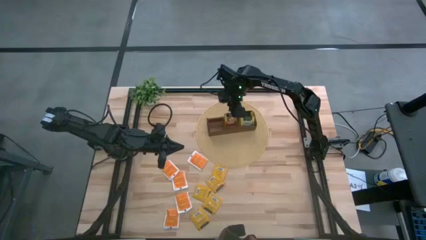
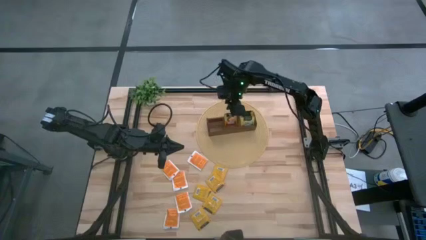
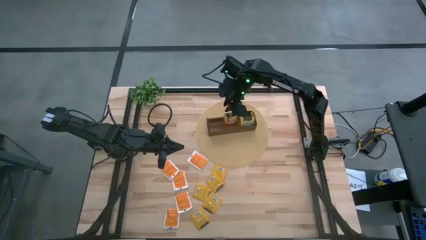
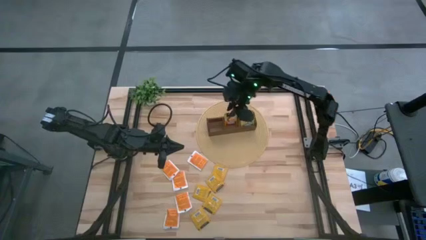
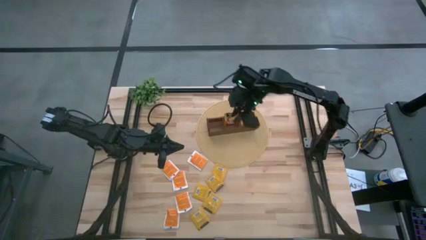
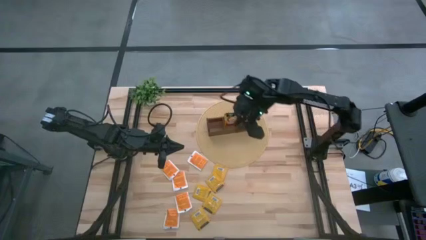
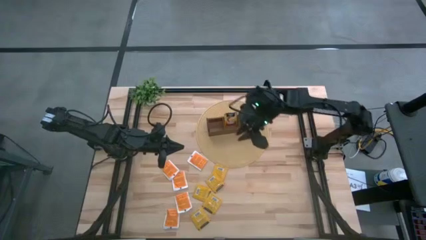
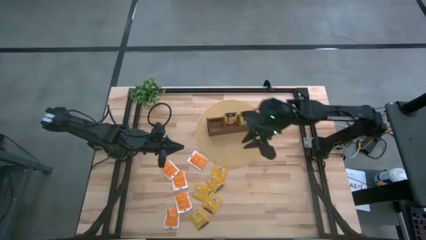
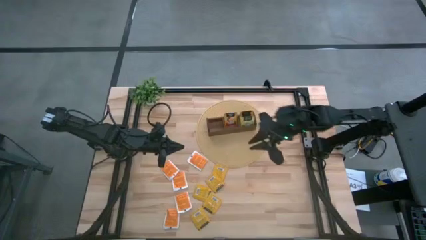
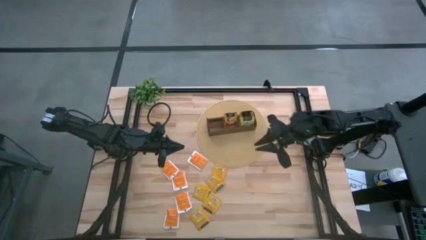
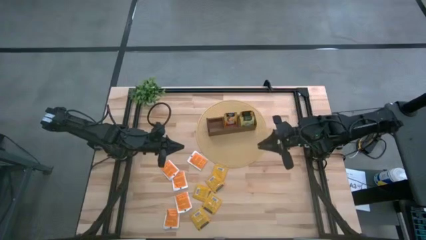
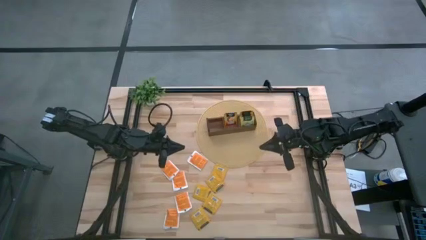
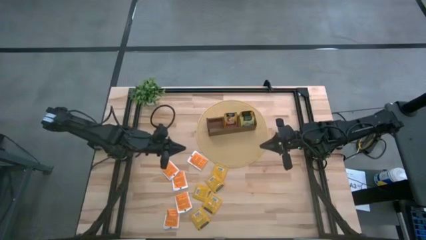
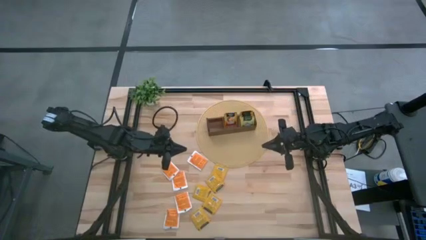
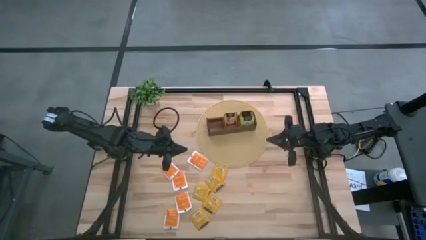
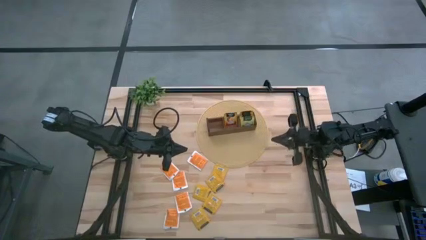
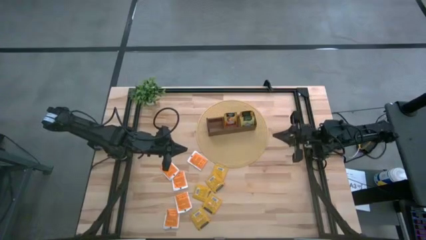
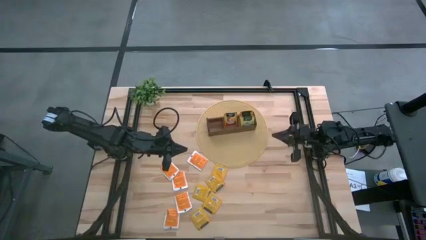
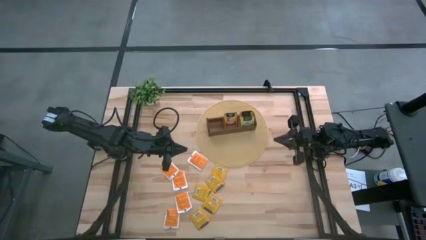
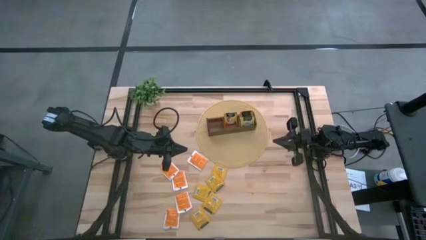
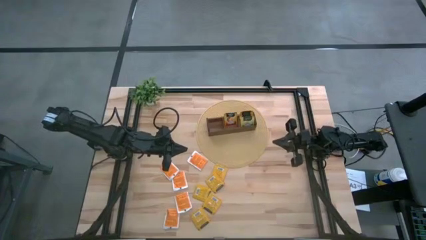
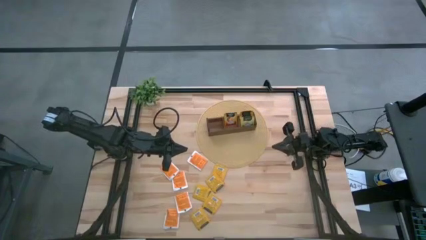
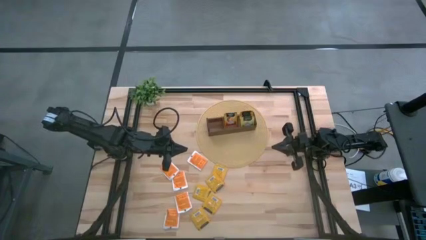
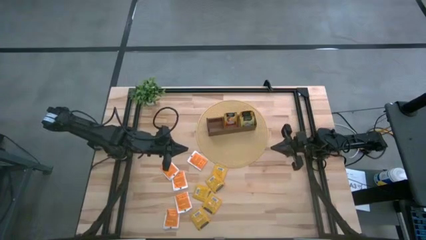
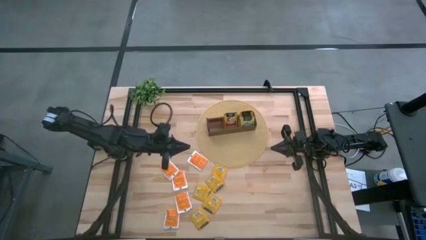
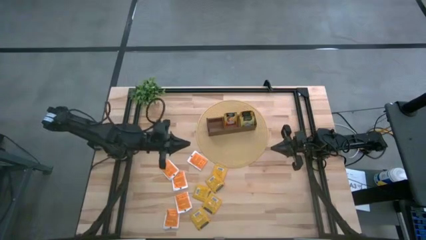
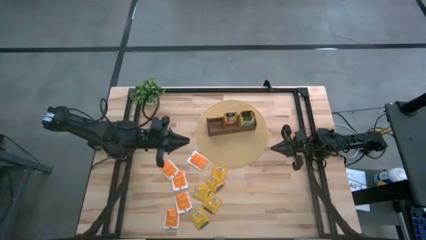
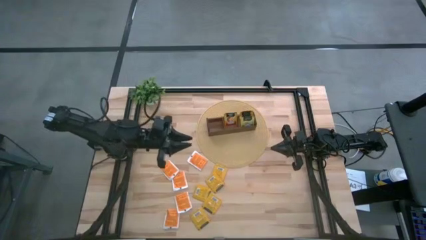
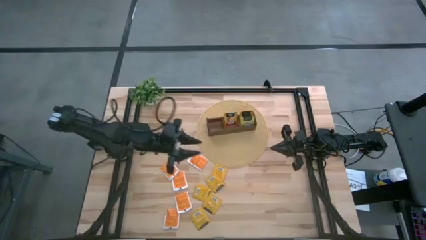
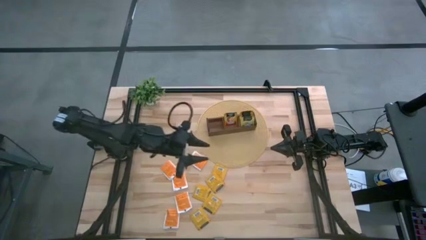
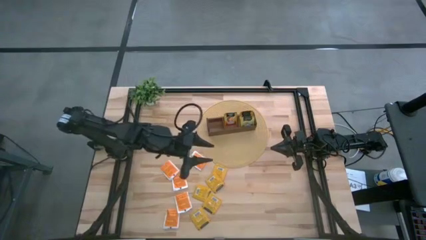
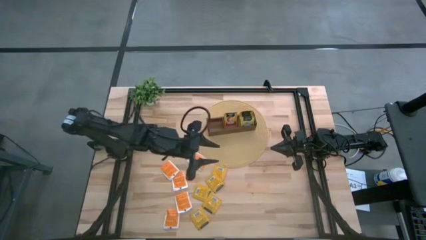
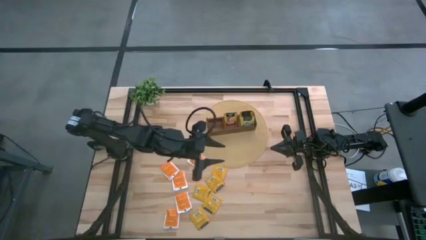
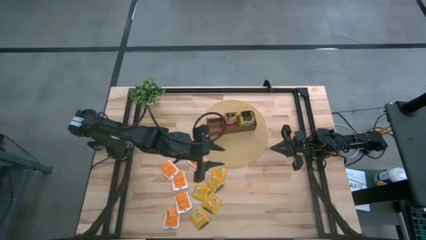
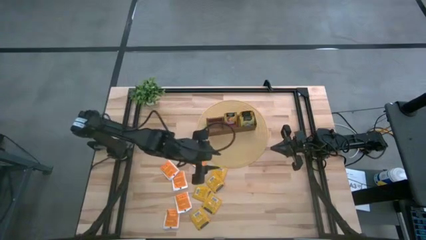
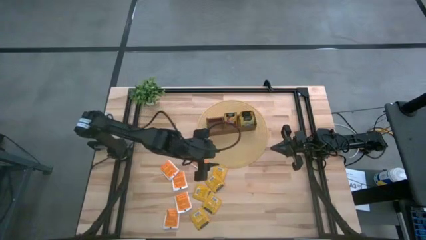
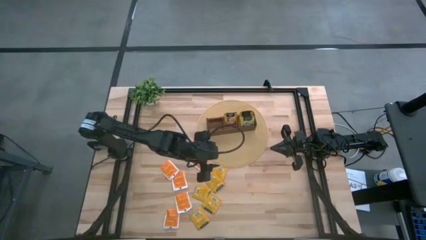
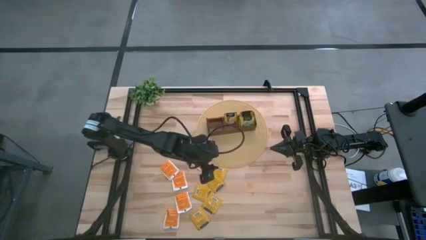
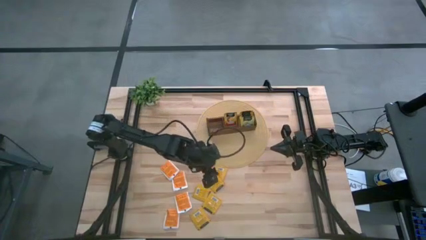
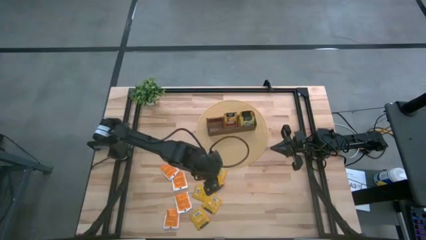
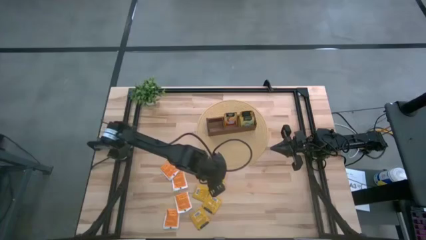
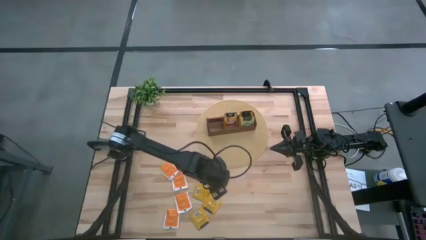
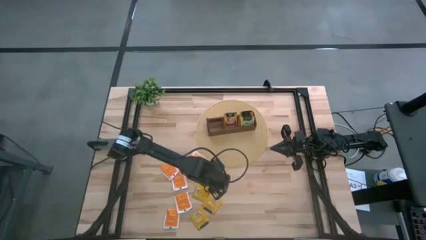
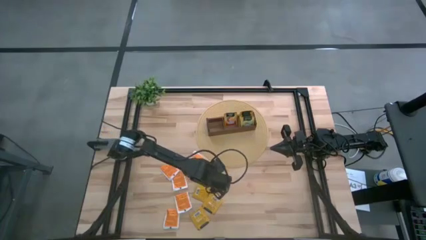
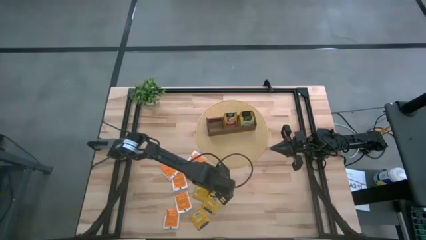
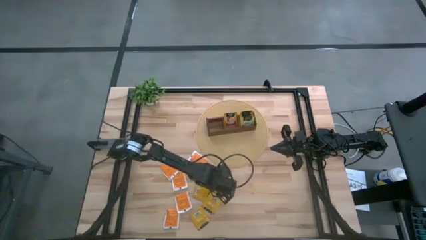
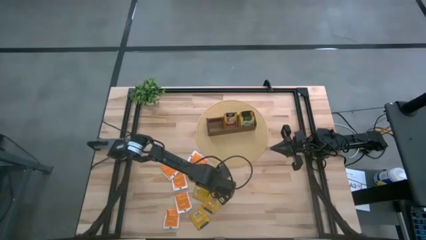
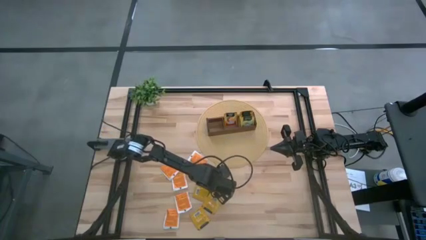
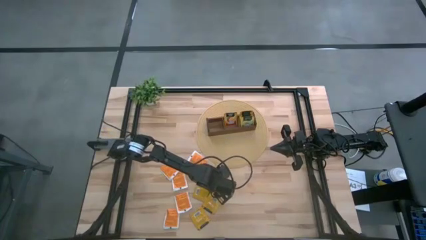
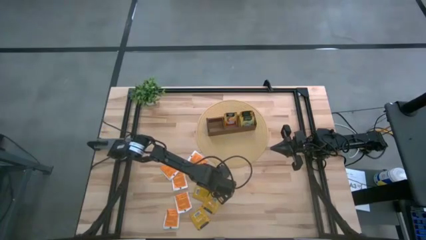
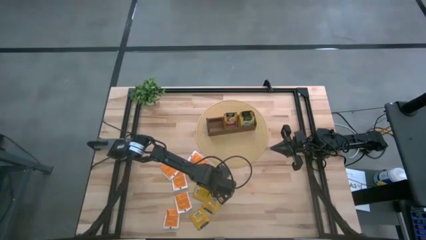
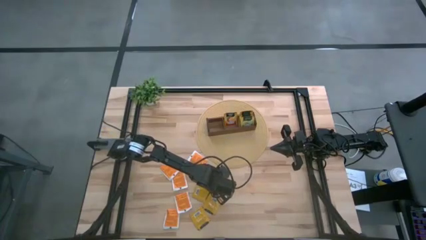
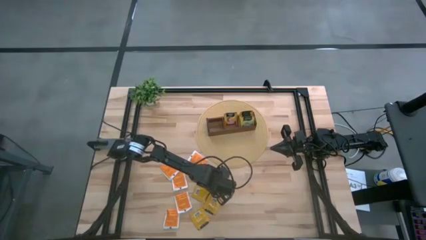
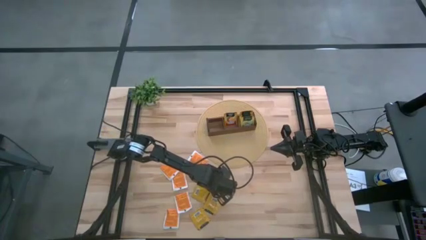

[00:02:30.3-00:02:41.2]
Task: Pick & Place Tea
Put the orange tea bag into the middle section of the wooden organizer

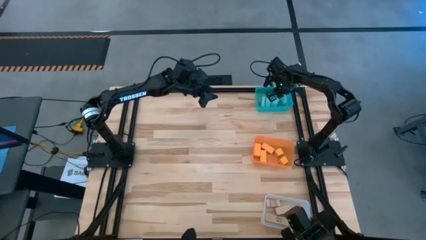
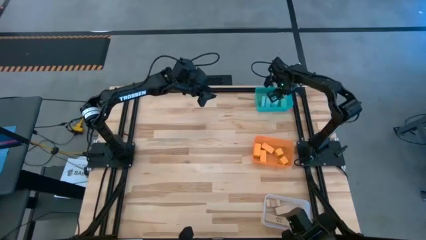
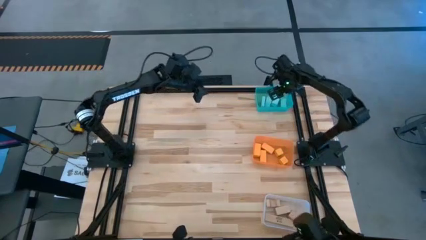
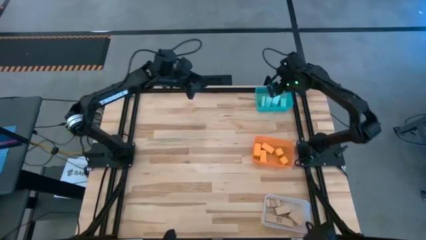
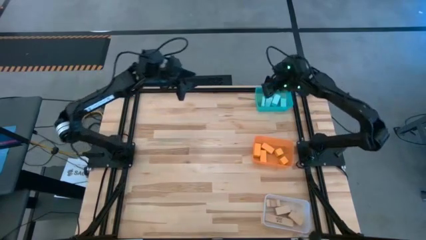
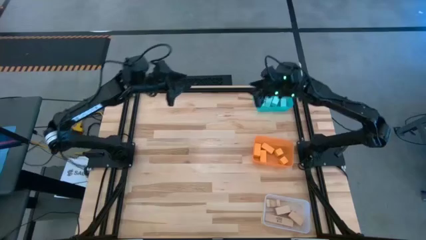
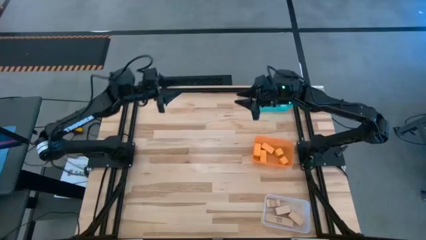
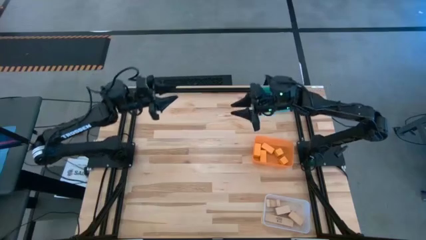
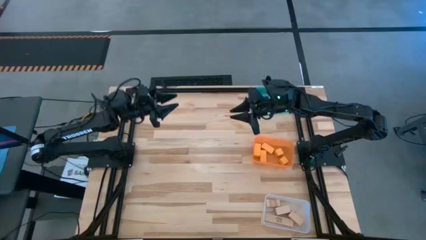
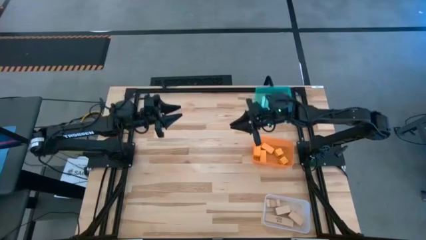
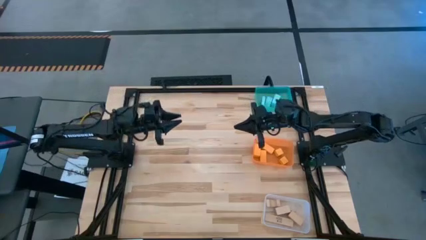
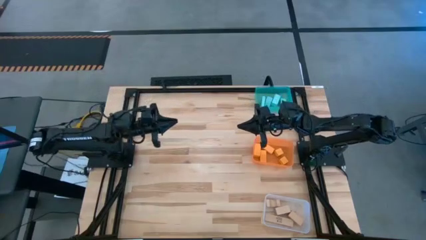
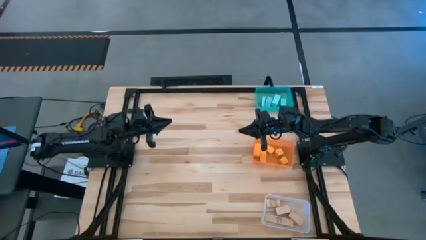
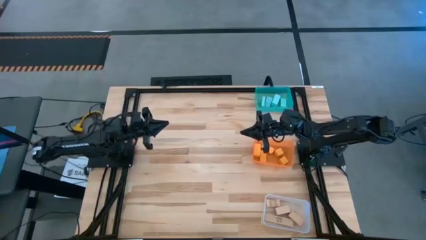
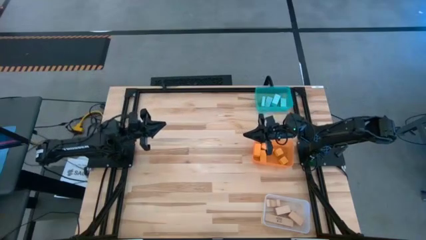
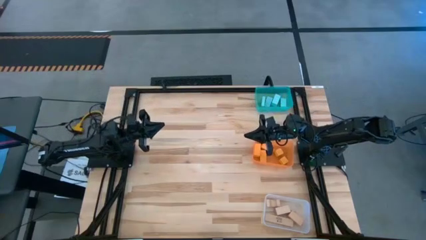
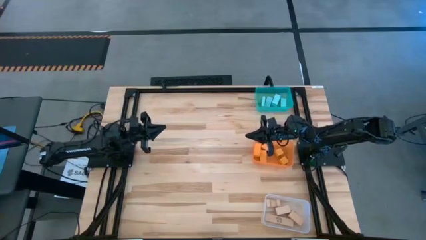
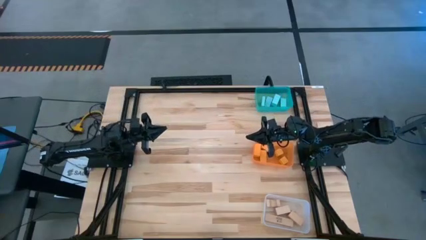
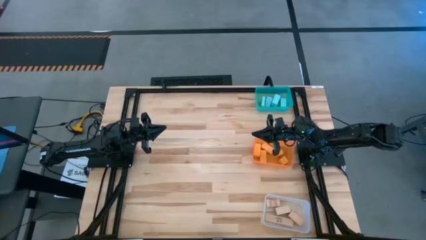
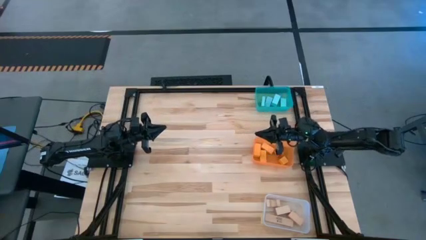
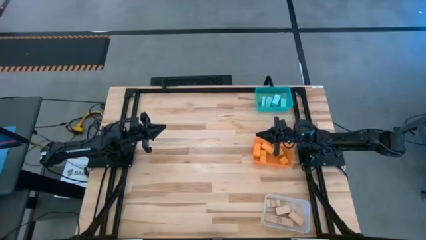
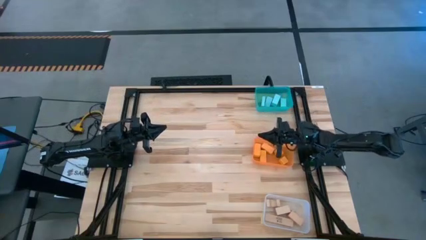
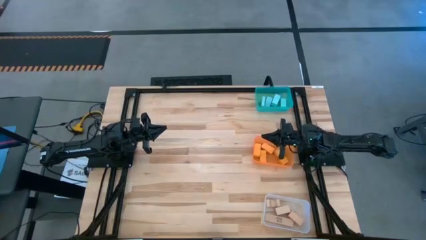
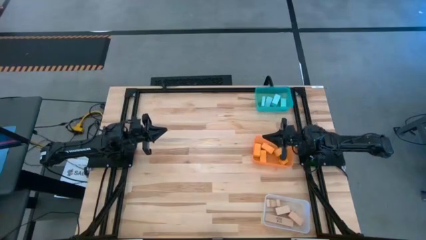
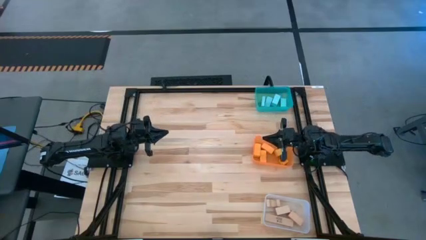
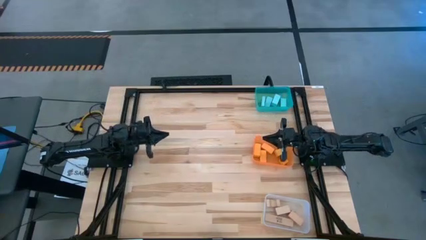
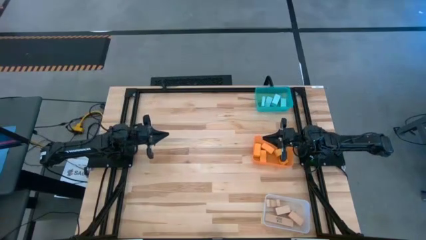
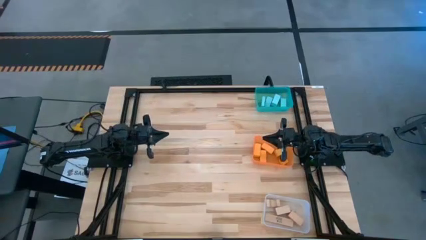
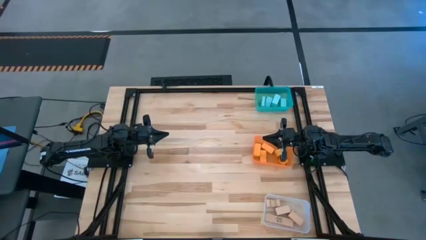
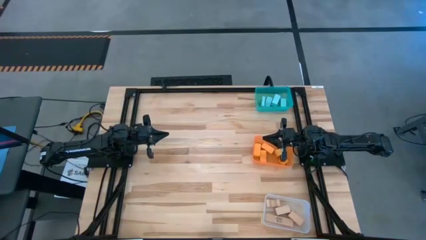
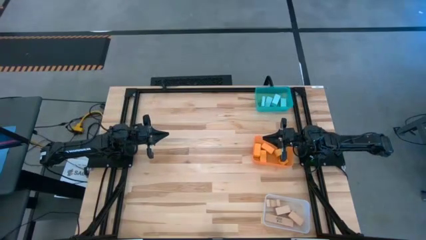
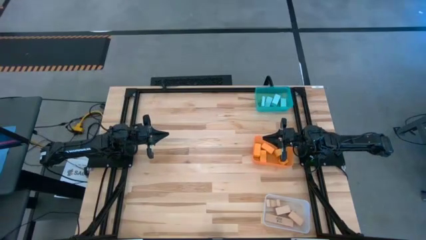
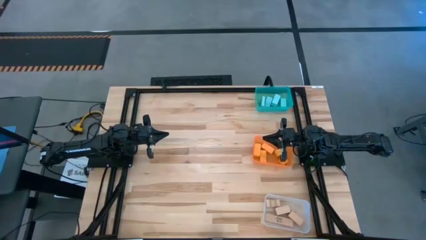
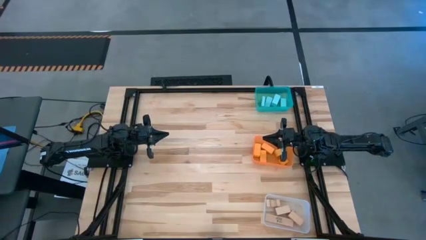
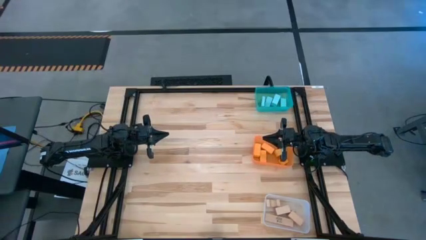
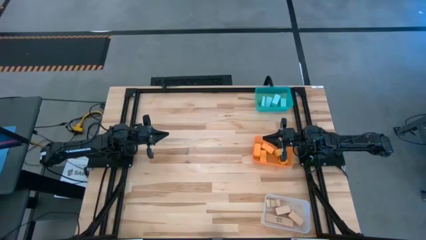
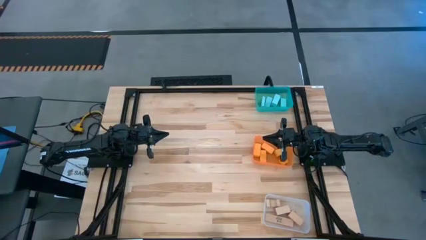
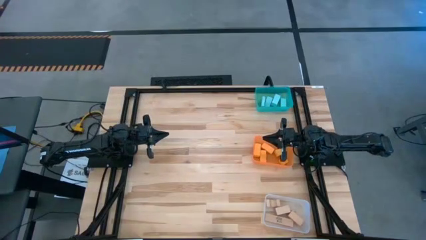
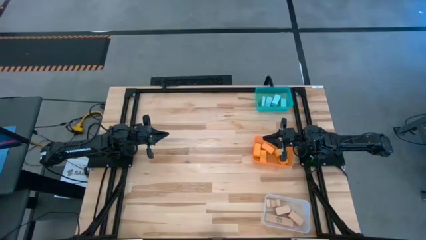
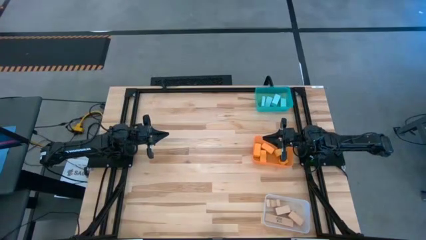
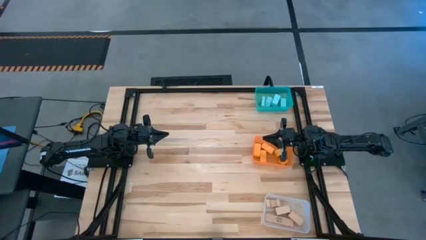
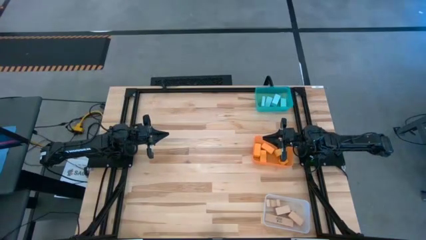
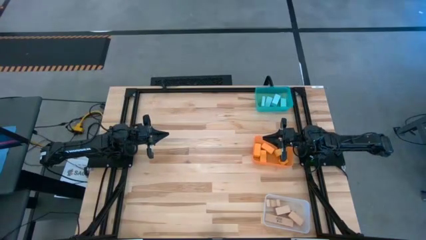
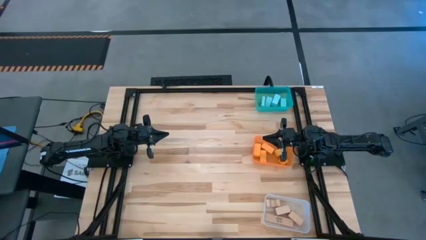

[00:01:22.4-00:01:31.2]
Task: Sort & place blocks by color
Return to Home Position
